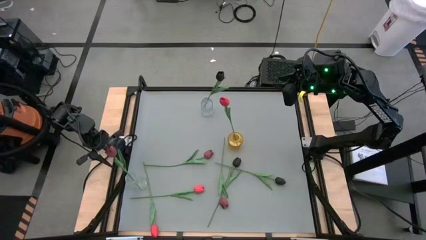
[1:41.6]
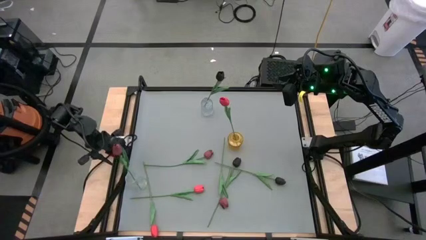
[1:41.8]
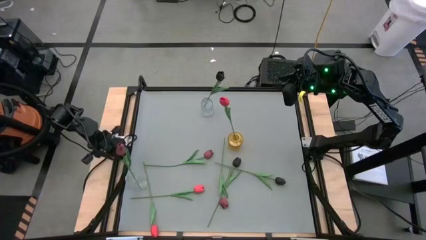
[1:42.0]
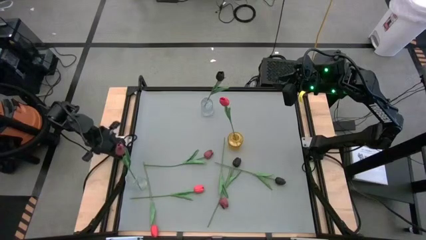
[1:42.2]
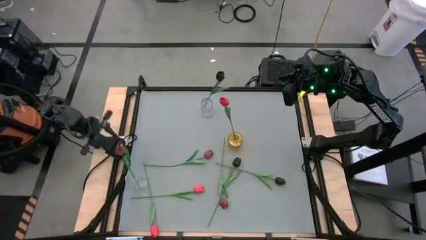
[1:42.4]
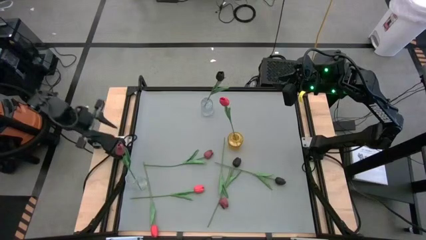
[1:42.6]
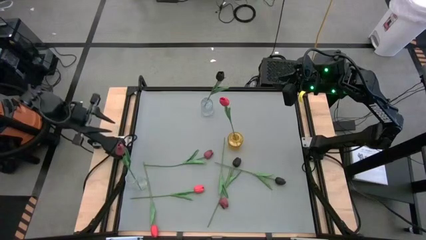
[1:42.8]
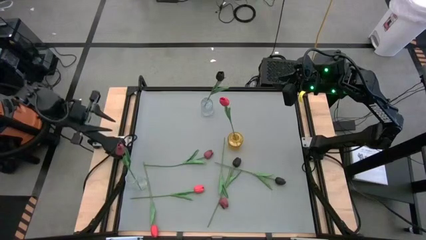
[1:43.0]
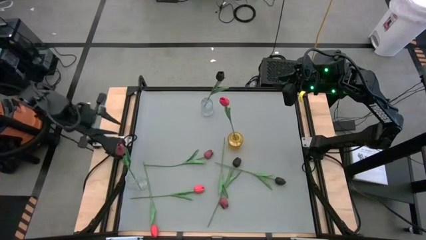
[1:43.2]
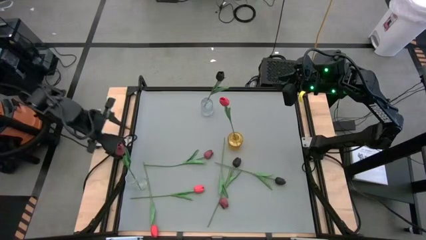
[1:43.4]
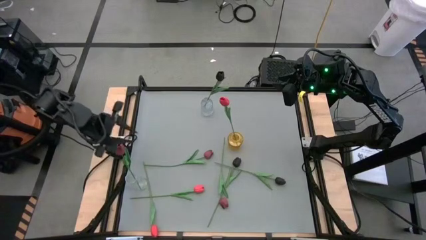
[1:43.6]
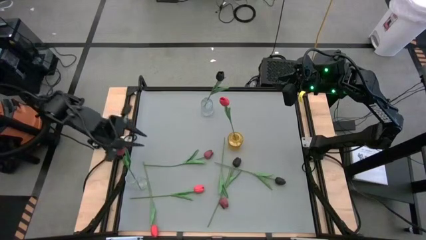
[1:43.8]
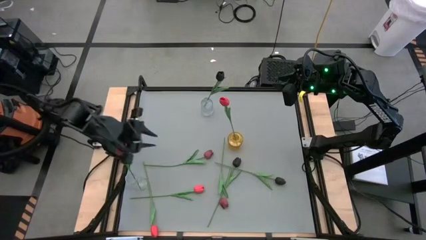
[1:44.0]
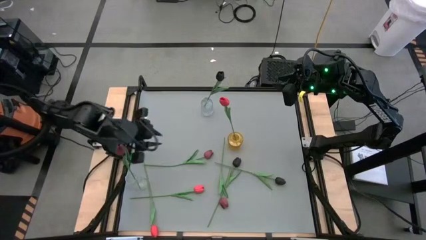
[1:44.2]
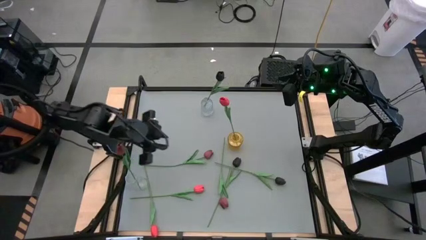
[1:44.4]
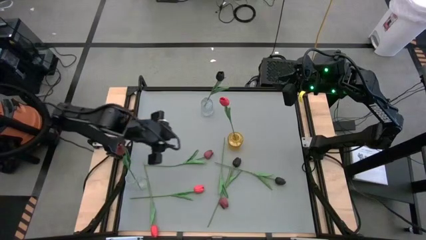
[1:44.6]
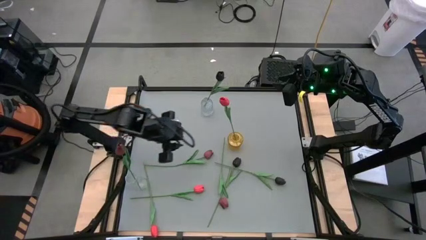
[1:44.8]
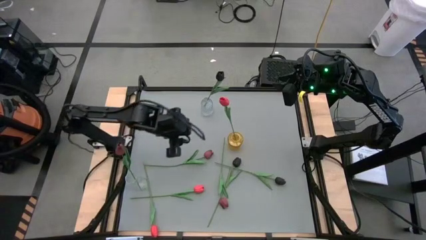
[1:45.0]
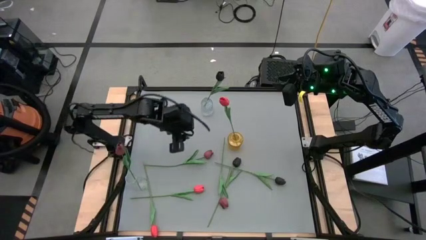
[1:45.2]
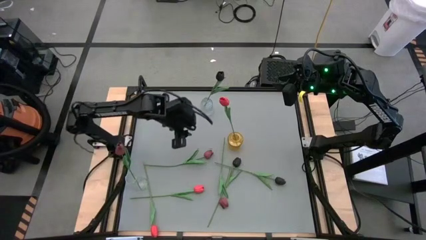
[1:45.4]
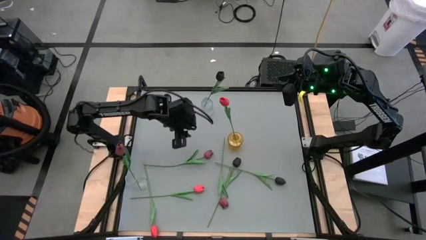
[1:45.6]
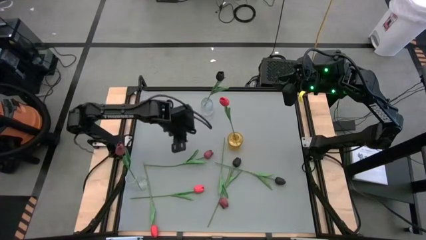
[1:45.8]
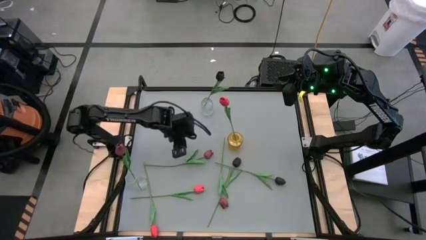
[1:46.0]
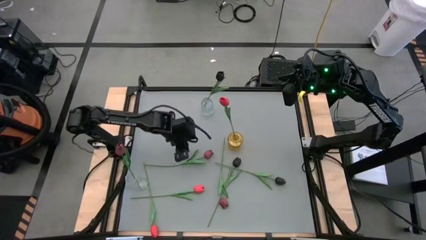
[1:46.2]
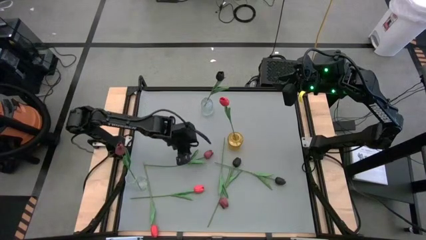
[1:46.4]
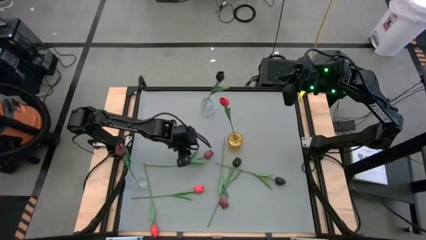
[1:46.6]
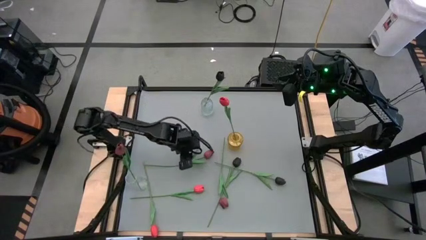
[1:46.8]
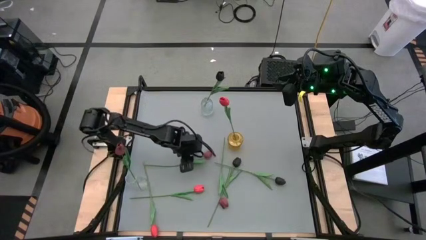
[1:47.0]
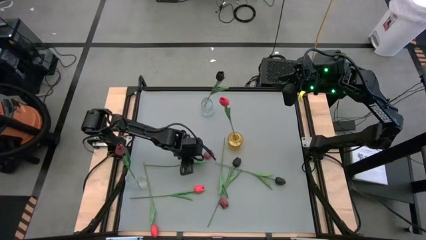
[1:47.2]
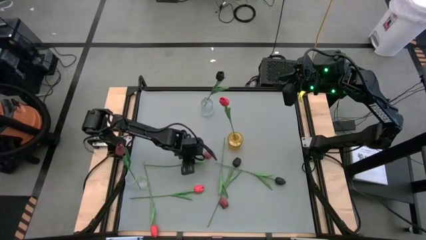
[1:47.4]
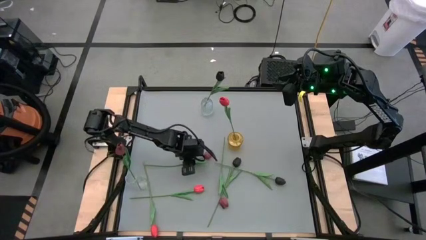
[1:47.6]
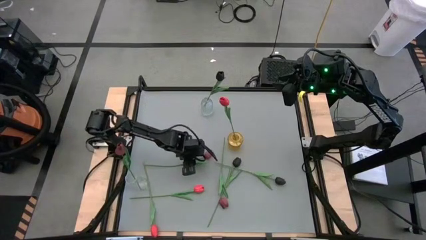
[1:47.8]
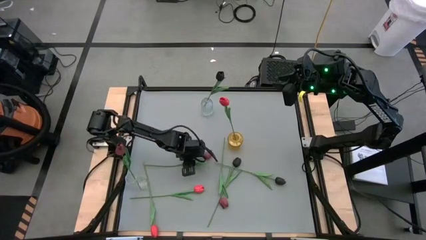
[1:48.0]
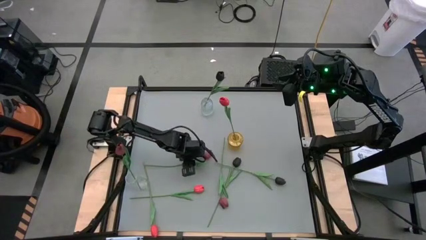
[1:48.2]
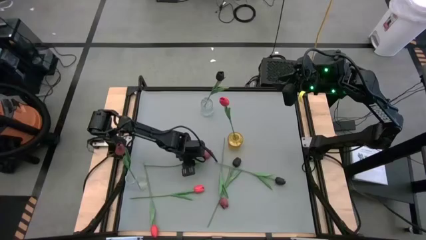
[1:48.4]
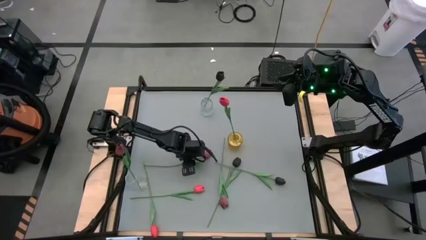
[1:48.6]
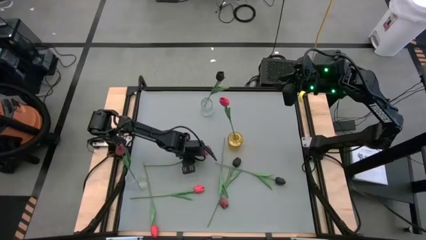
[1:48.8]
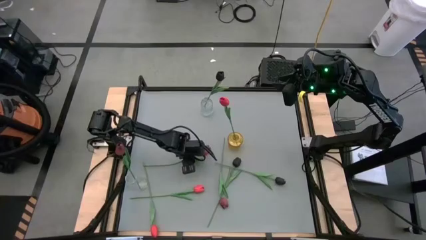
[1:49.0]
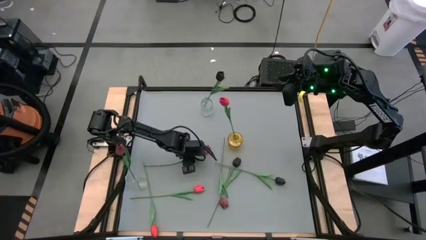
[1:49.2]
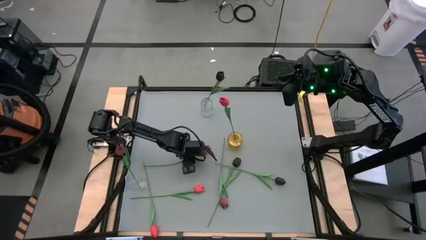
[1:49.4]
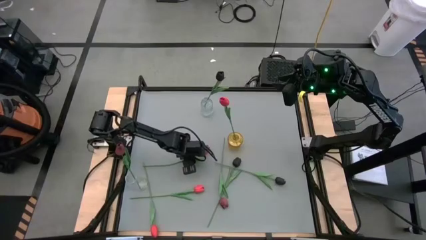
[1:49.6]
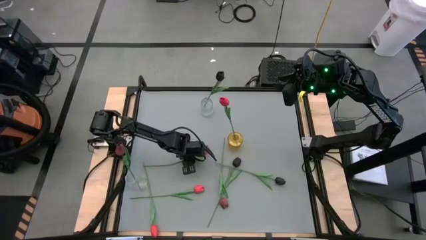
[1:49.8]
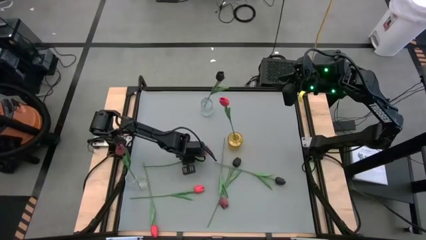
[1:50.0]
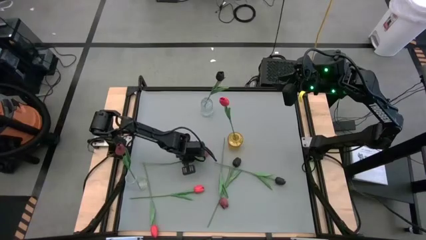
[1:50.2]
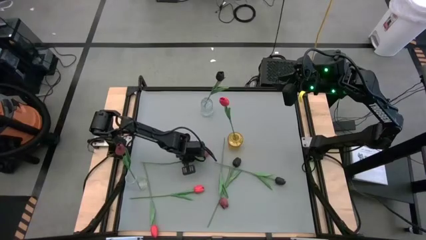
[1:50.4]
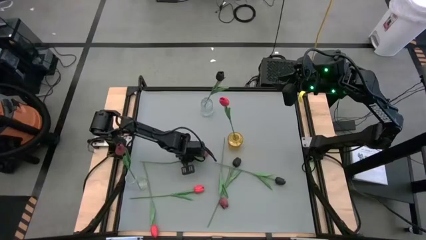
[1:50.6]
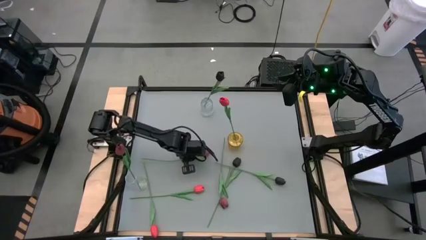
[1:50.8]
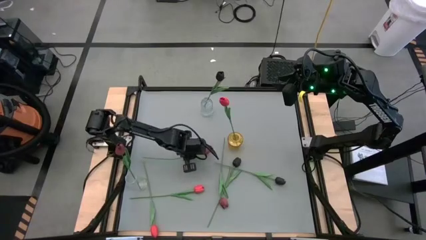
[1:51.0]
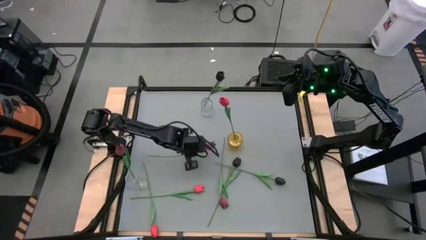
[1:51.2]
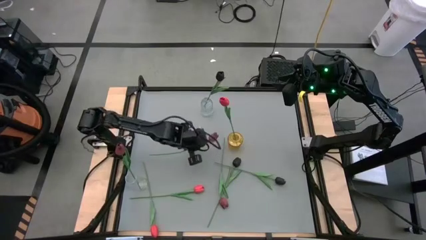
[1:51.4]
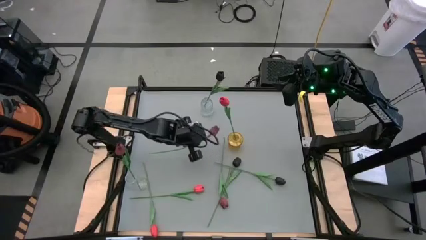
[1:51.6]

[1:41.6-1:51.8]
Task: Sort flowers into vase by color
Put the left red tulip into the bottom transparent vase

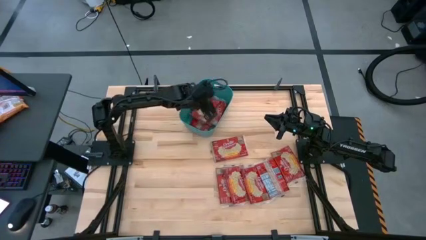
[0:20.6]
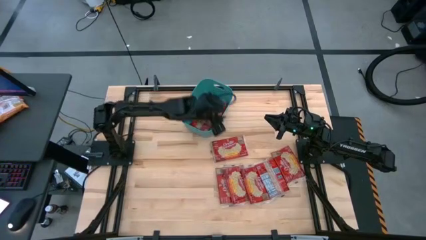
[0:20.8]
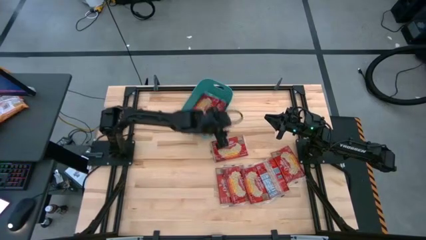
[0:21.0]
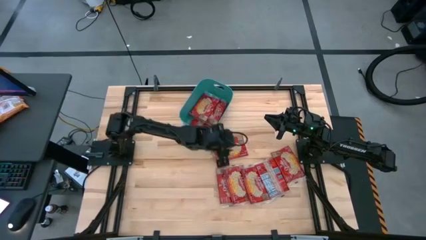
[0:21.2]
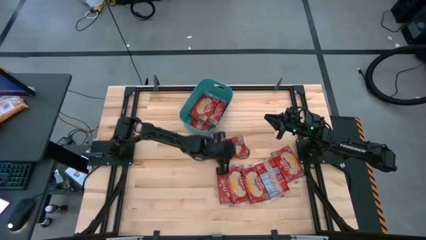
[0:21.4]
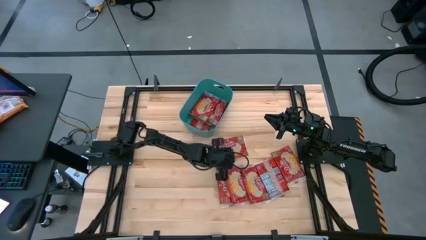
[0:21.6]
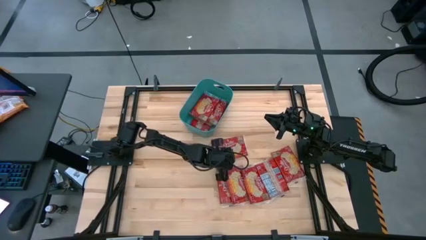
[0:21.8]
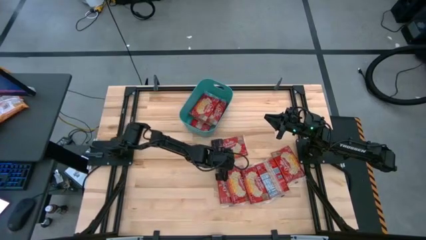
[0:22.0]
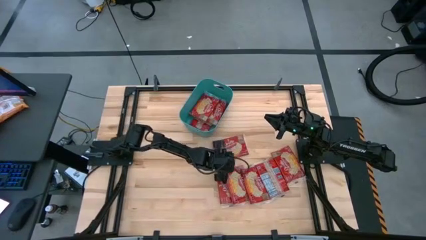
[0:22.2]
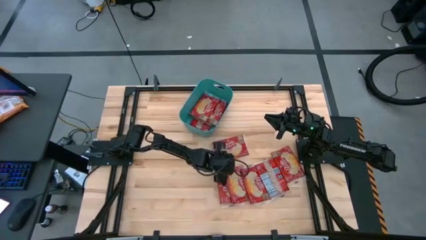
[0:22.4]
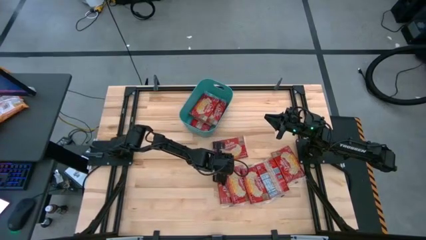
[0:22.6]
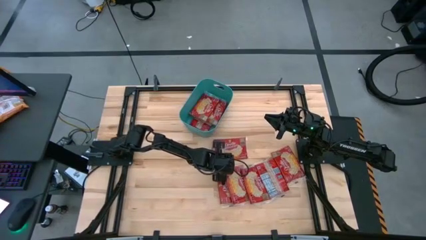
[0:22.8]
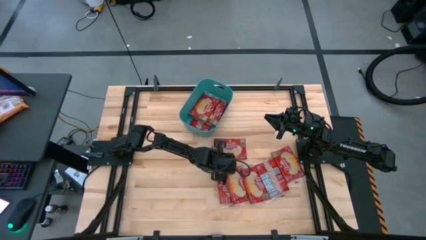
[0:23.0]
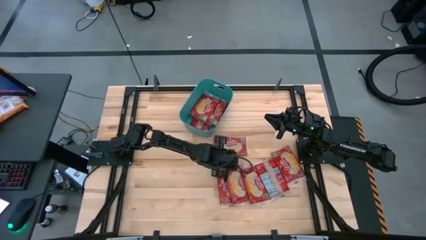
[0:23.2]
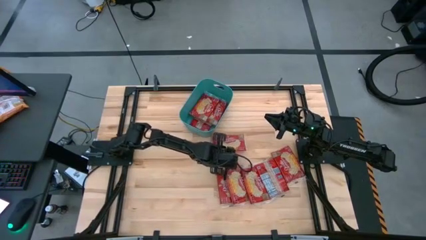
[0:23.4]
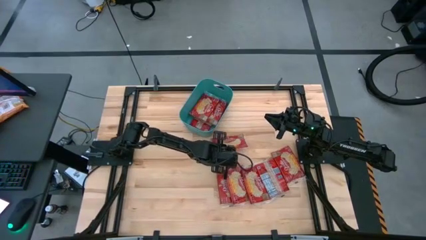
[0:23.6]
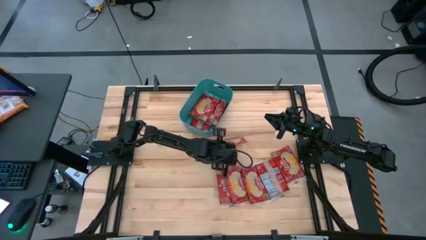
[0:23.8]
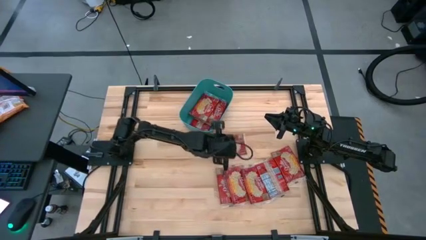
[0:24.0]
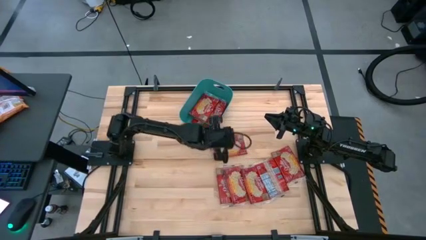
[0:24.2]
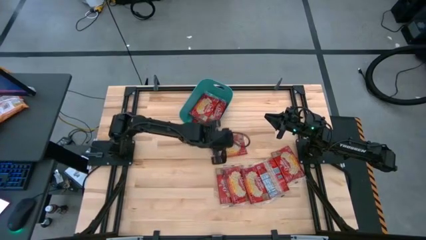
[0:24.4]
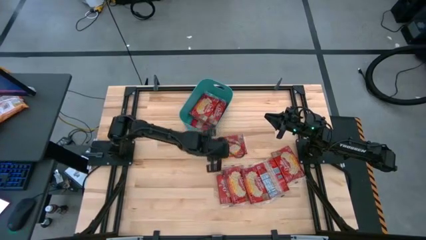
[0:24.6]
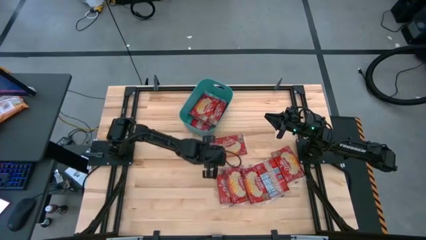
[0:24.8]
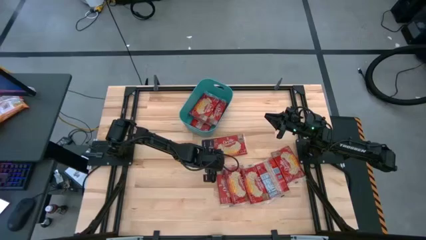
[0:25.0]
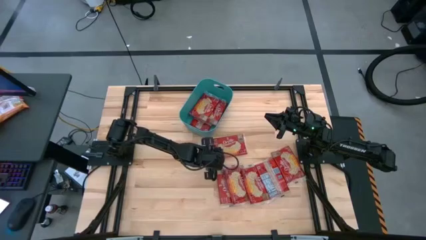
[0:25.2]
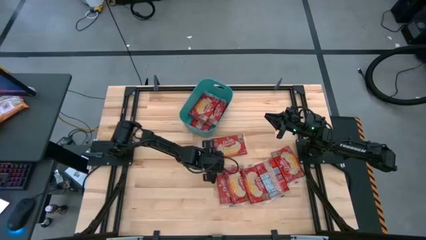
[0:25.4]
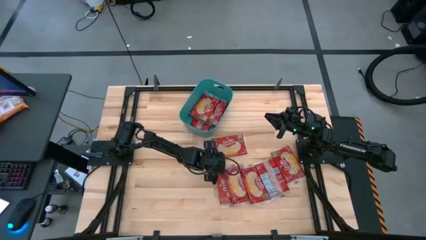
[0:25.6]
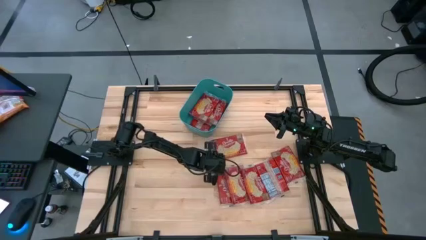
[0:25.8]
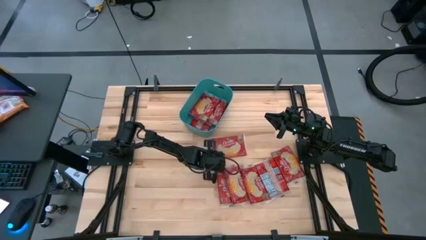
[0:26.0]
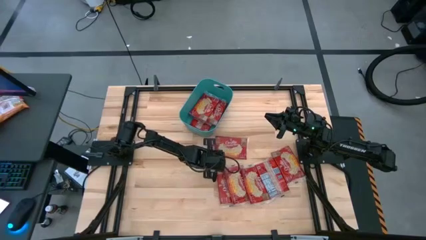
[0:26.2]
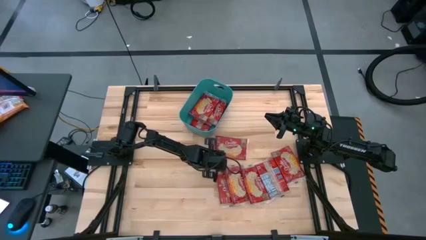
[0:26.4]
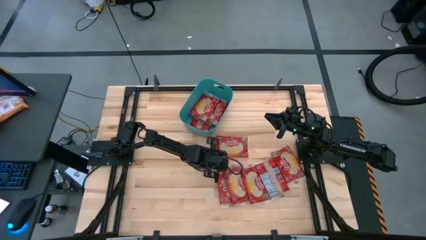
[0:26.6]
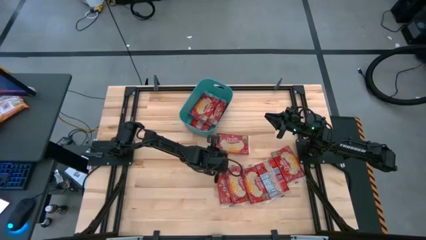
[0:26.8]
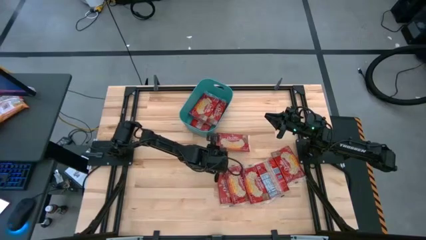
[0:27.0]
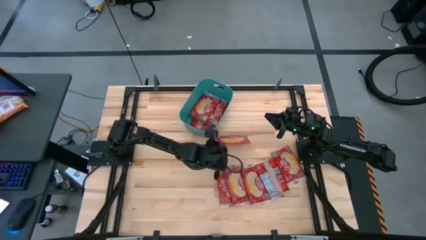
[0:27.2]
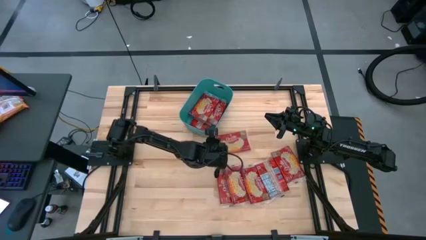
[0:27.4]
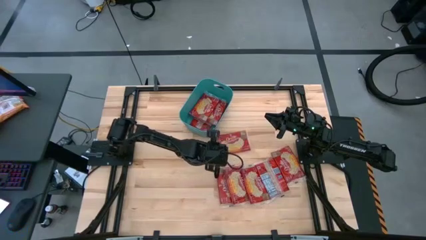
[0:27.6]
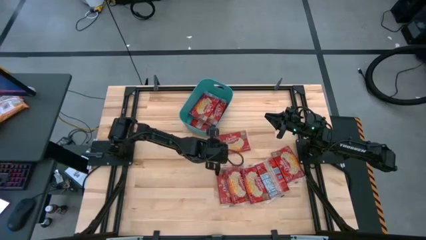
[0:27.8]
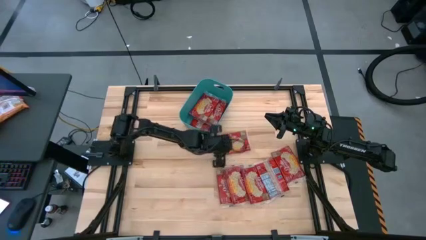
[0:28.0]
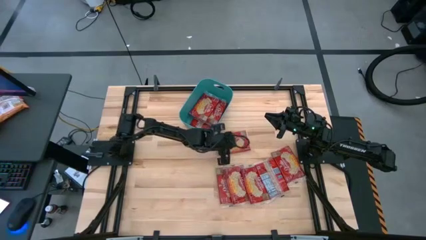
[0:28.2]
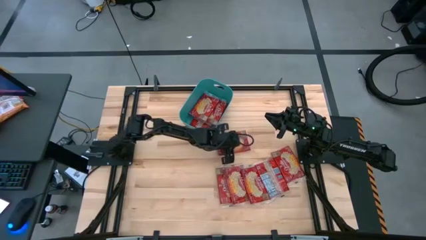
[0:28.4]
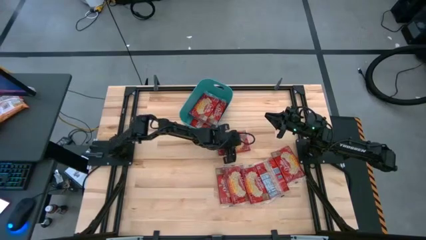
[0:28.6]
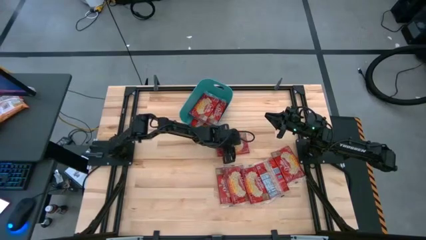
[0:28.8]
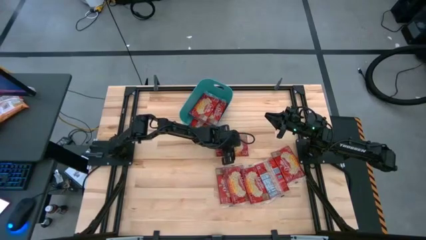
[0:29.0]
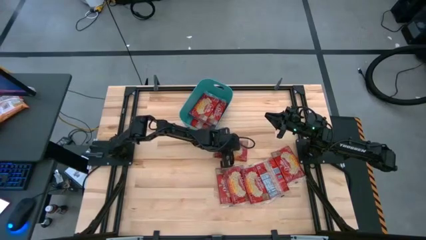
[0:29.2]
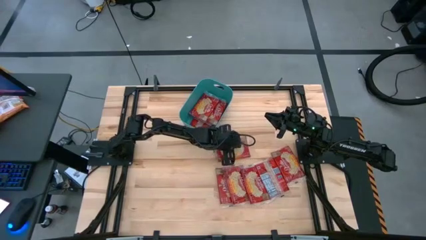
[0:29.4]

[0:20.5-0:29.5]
Task: Sort popcorn bags into baskets
Put the popcorn bag into the green bin
